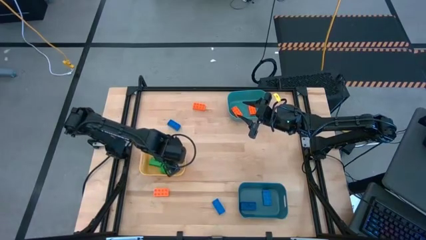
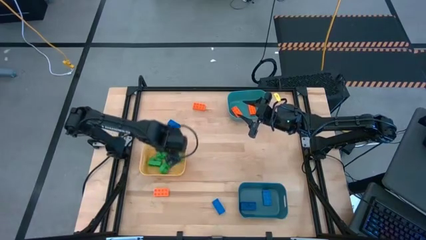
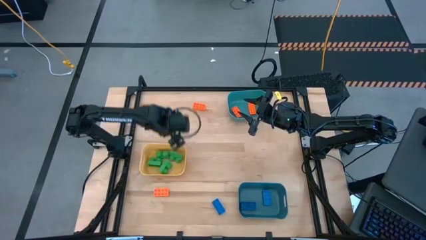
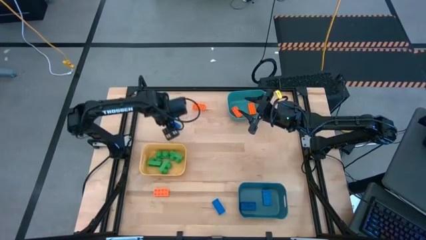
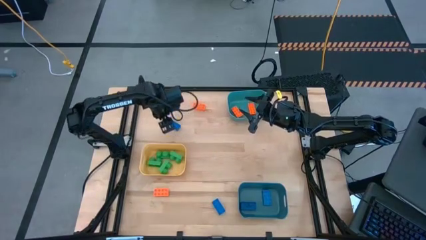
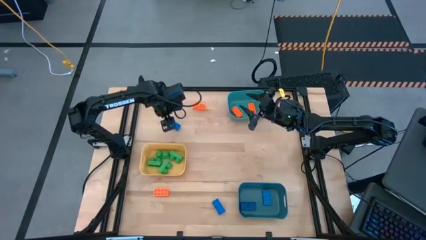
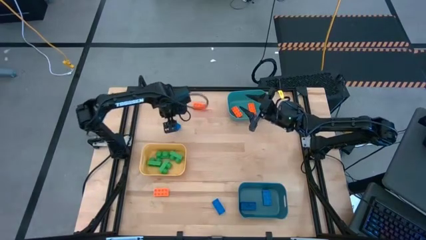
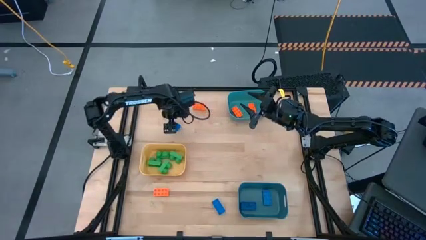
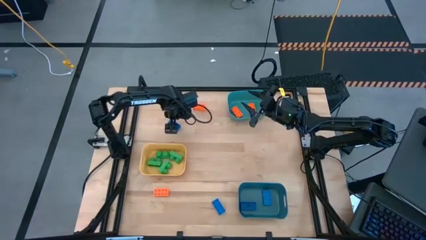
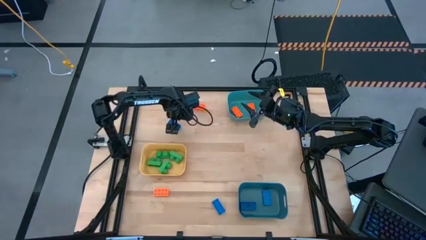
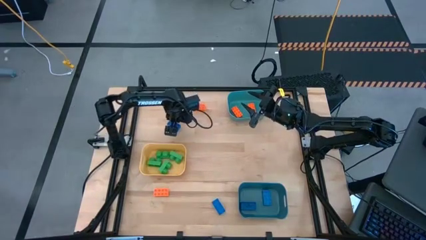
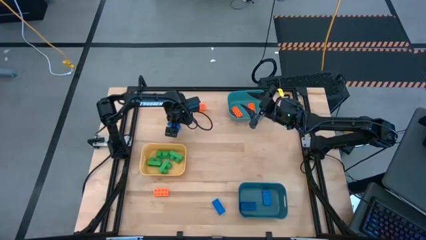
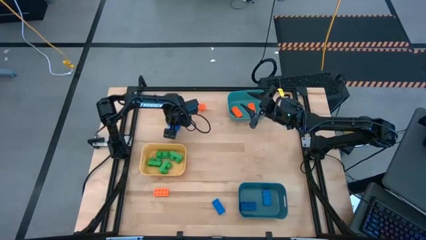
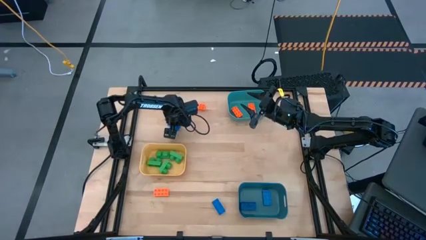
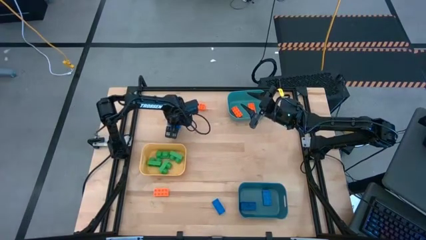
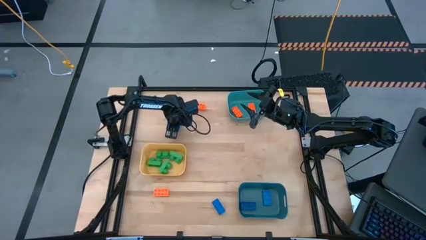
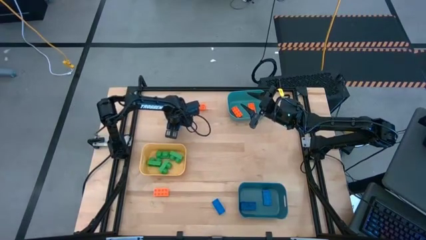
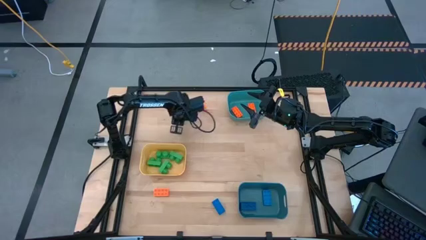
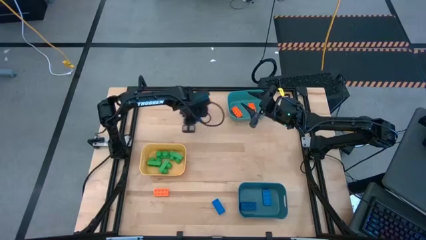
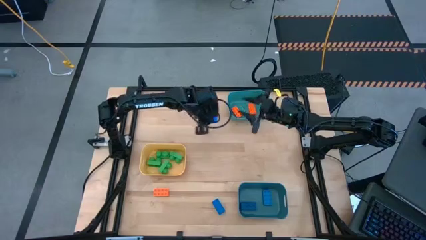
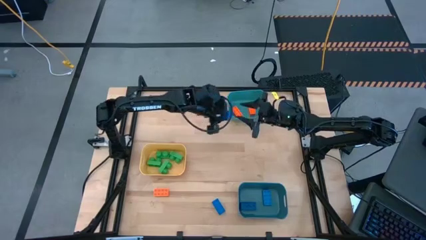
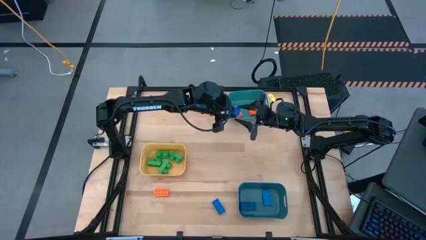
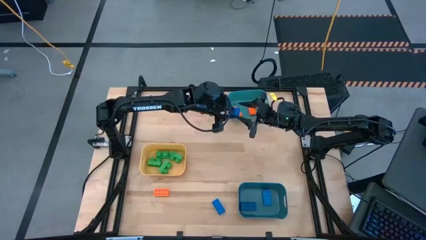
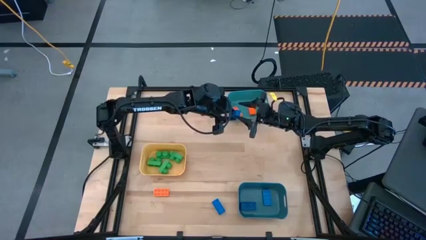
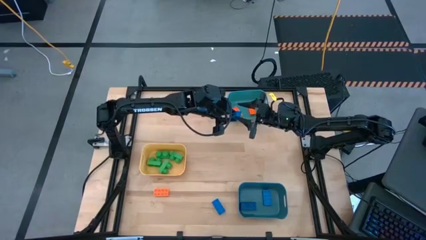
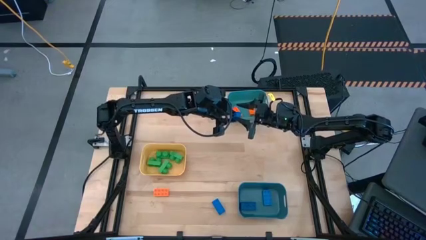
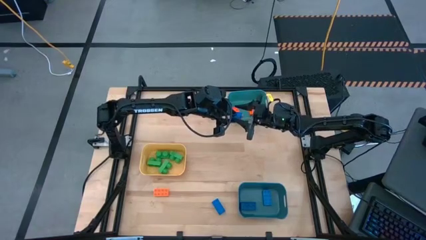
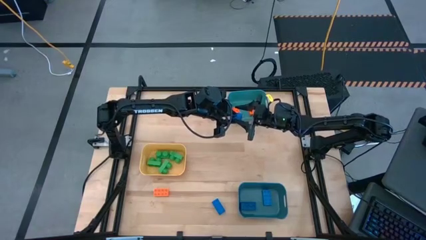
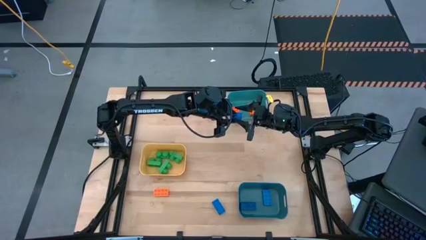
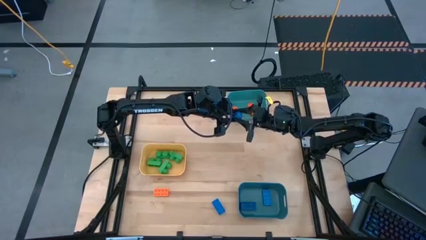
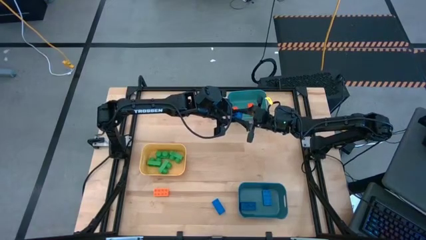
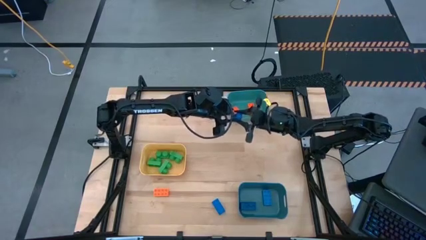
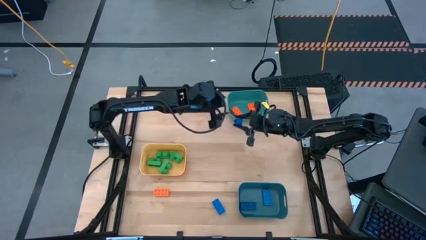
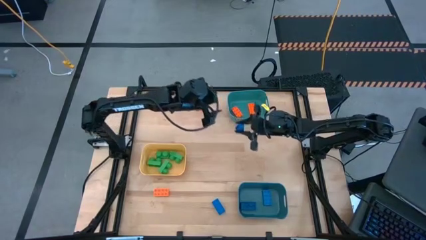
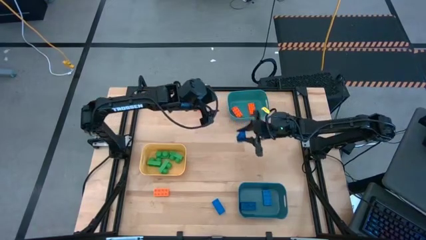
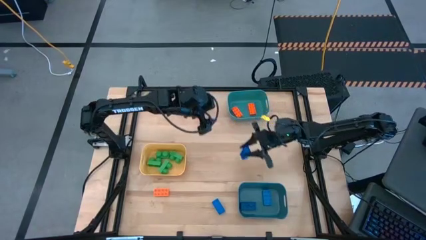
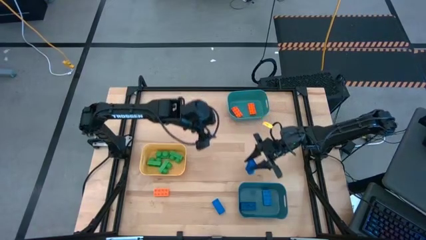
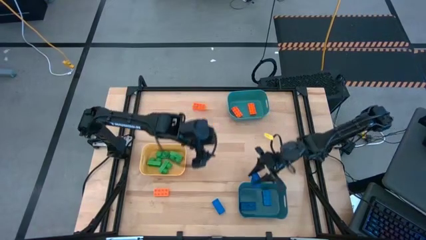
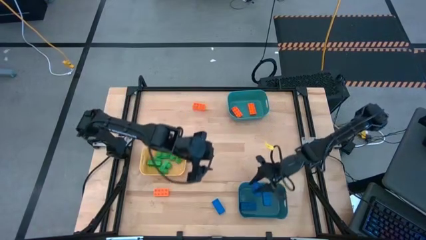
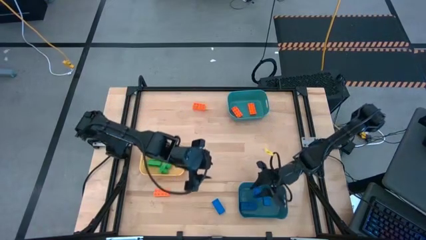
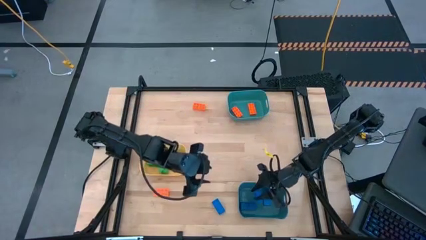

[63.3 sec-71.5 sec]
Task: Sort & place blocks by color
Put the blue game piece into the blue bin

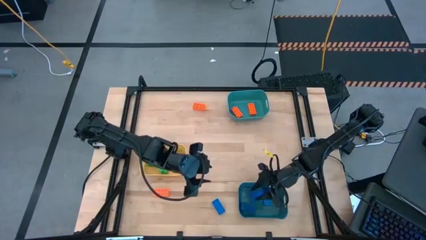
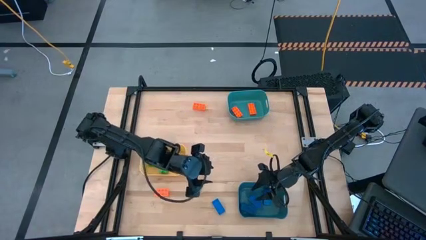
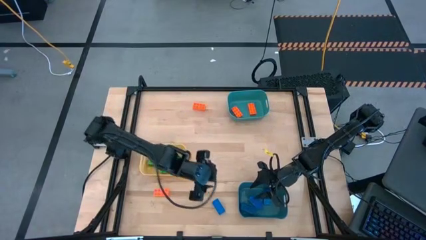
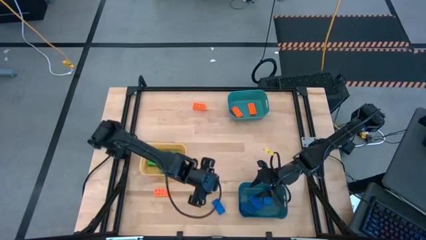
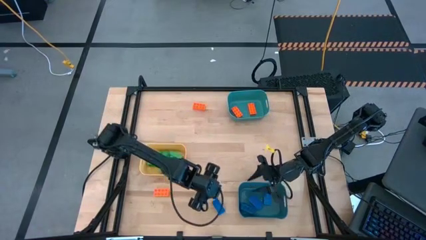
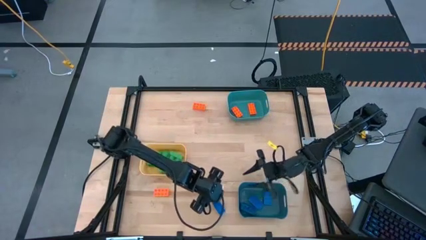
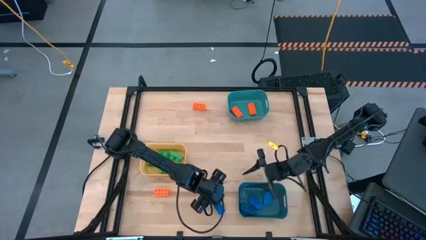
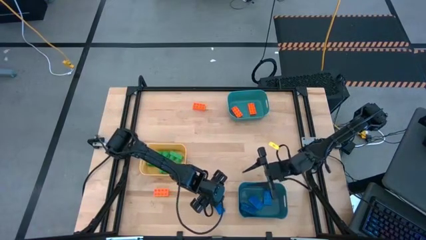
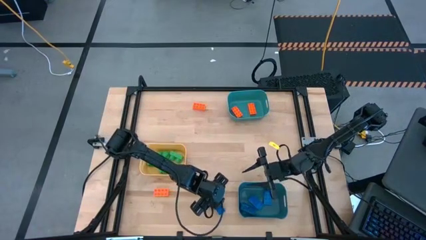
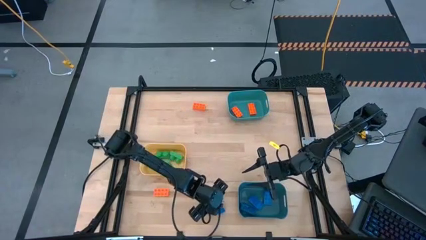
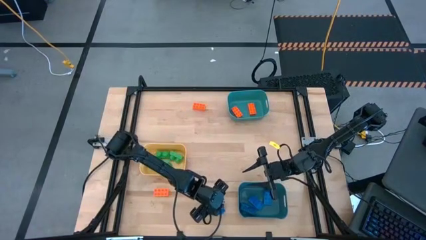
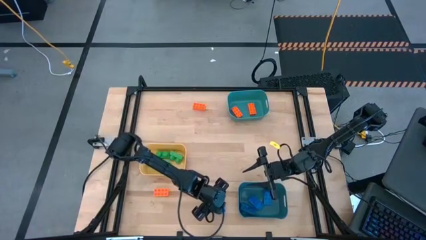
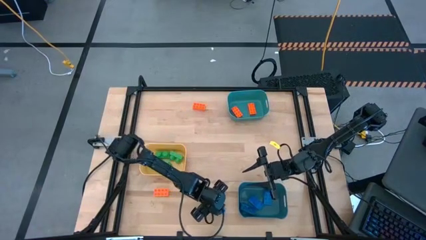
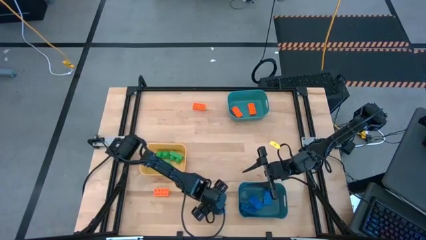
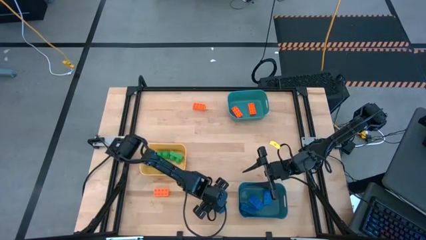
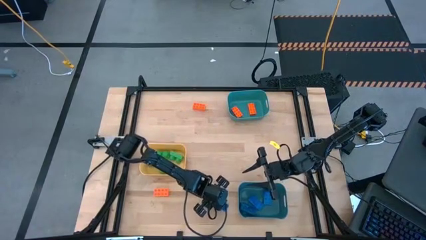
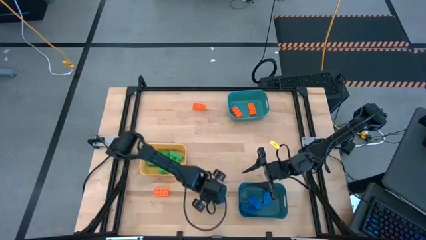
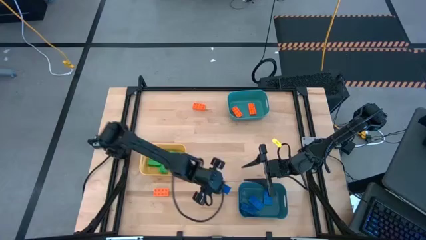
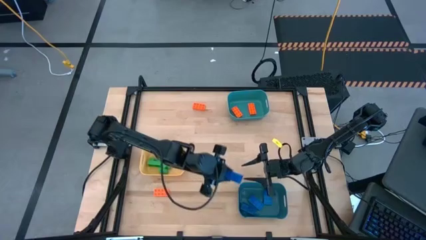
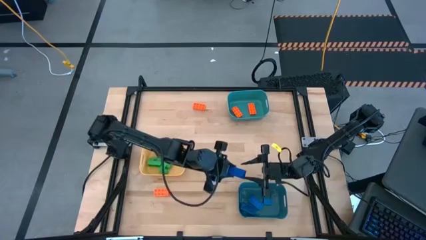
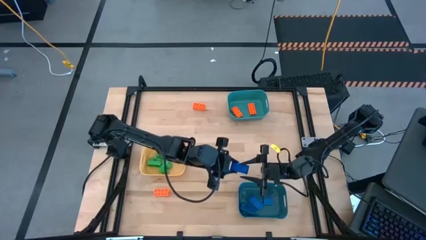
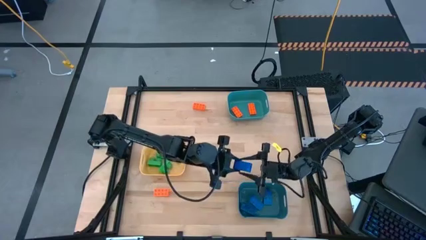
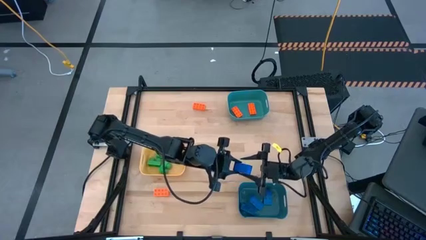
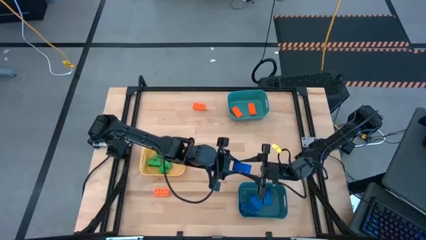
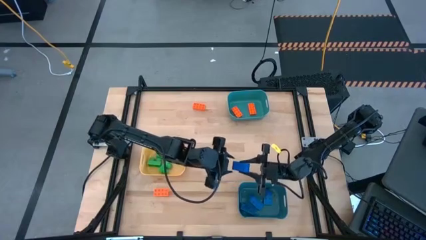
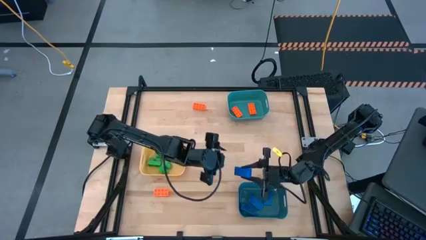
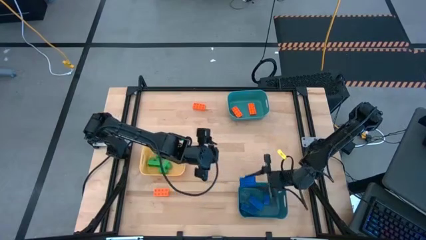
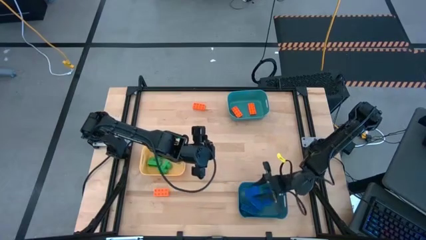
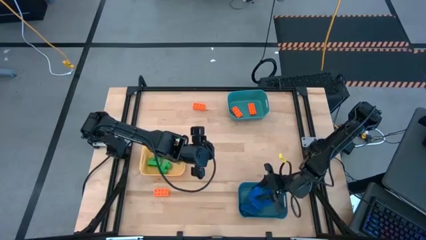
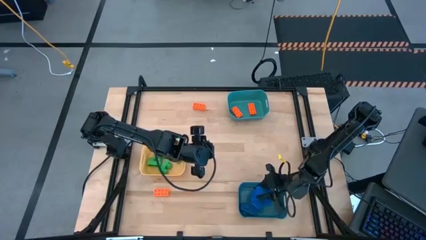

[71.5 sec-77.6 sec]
Put the blue game piece into the blue bin

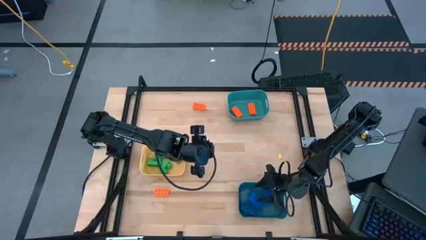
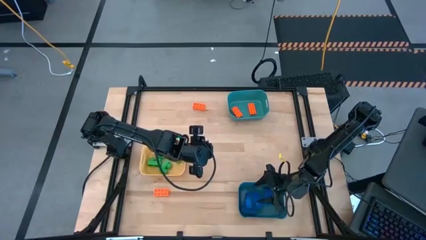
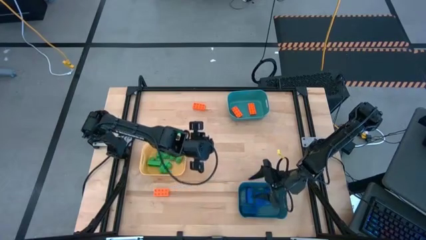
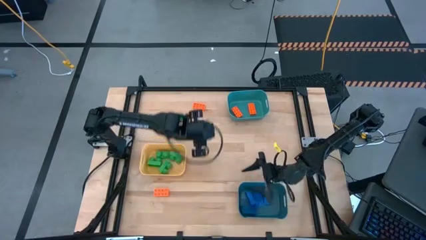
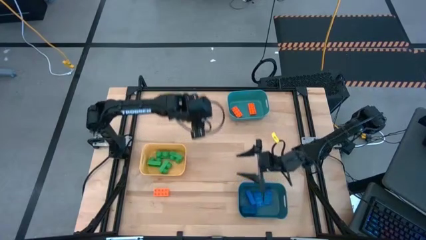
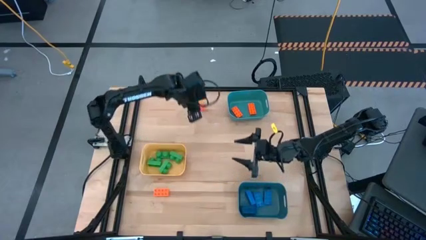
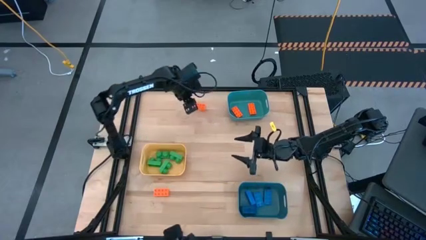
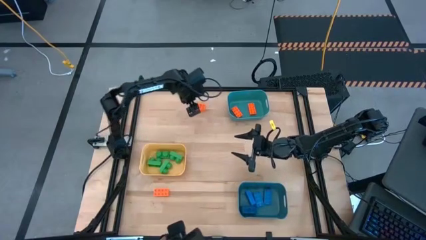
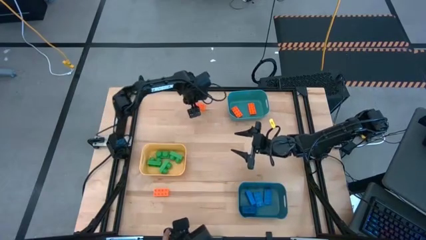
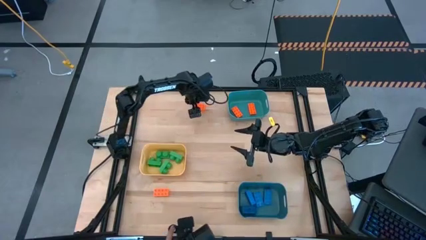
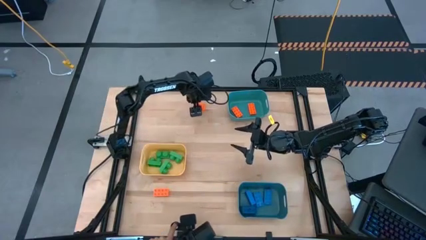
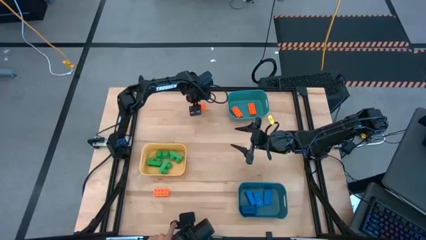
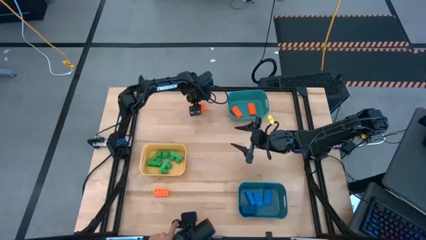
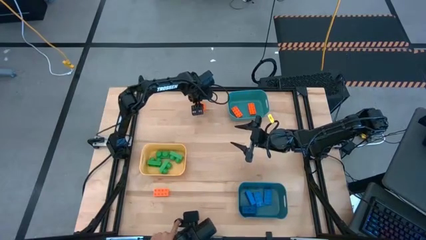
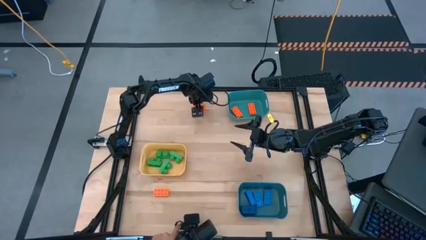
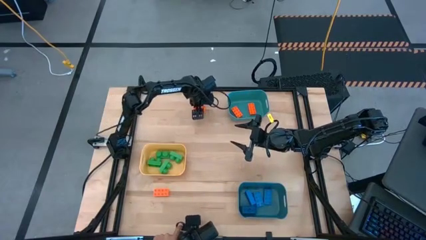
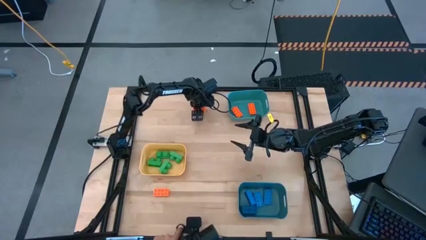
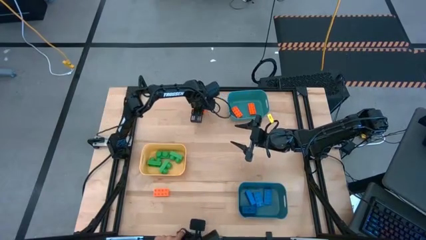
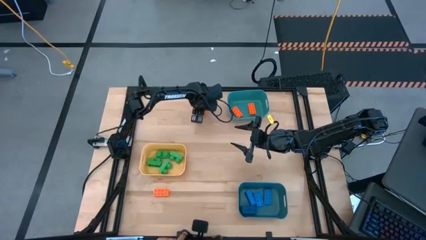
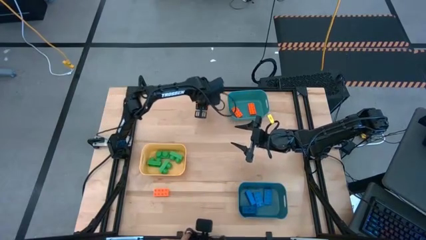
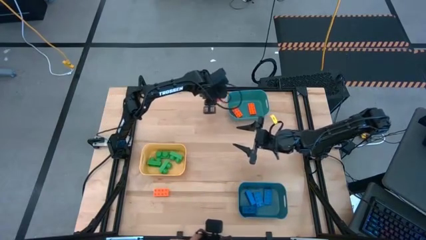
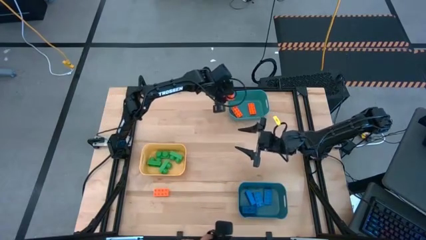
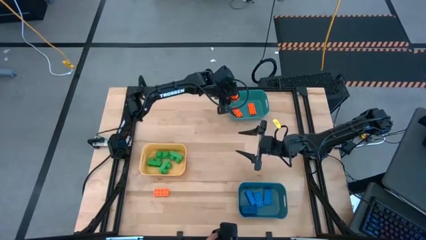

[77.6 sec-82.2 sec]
Put the orange game piece into the green bin
